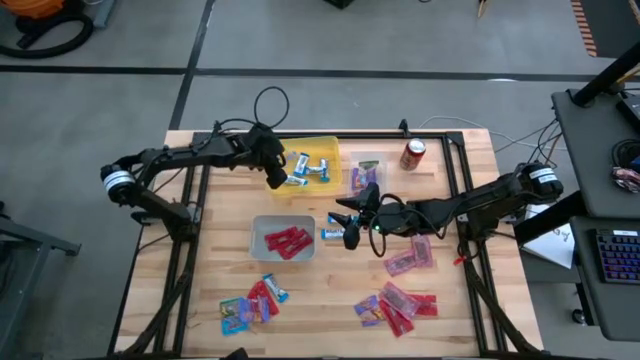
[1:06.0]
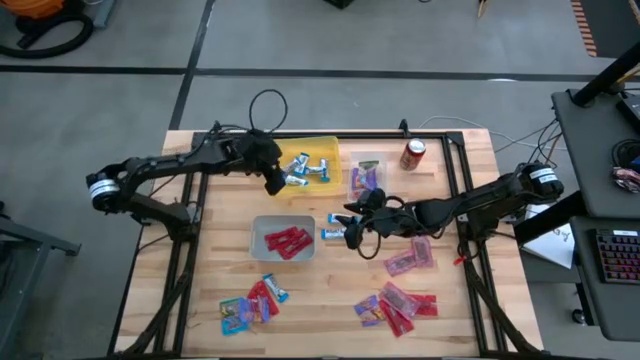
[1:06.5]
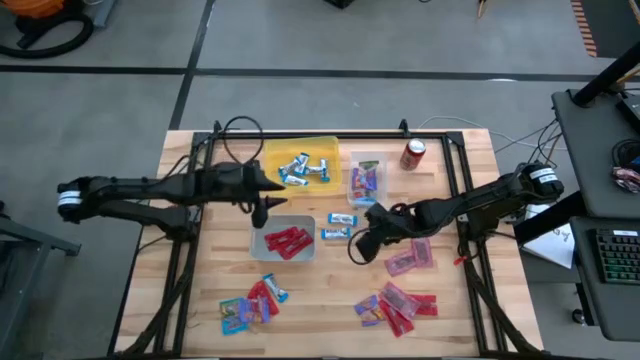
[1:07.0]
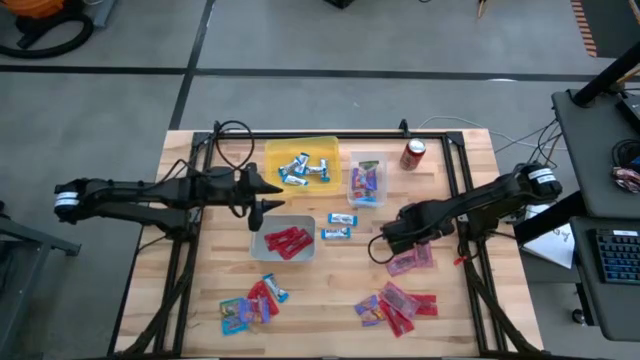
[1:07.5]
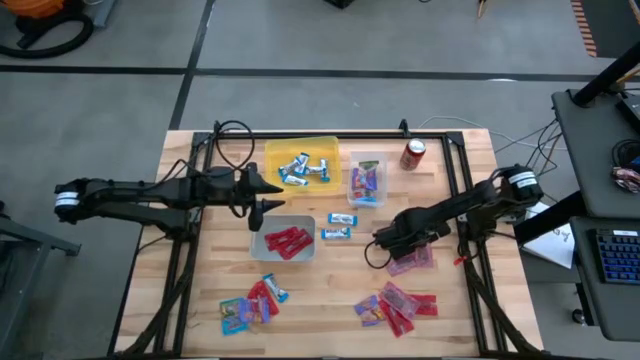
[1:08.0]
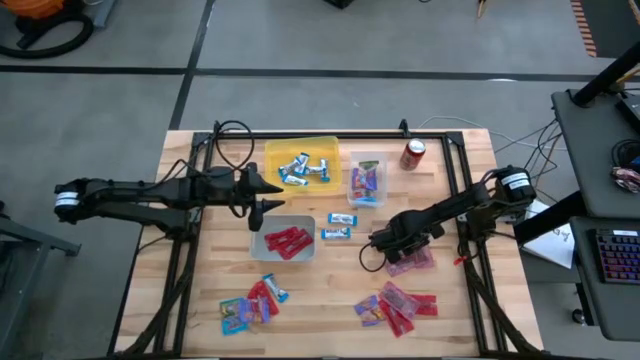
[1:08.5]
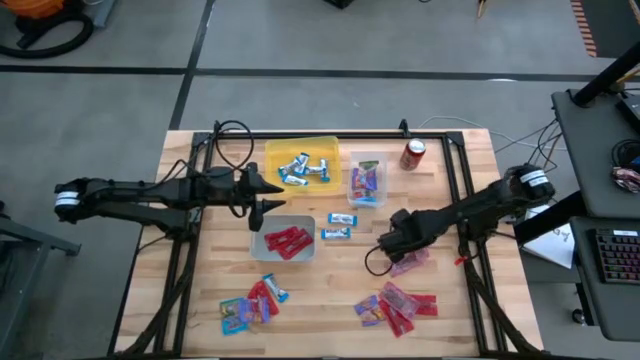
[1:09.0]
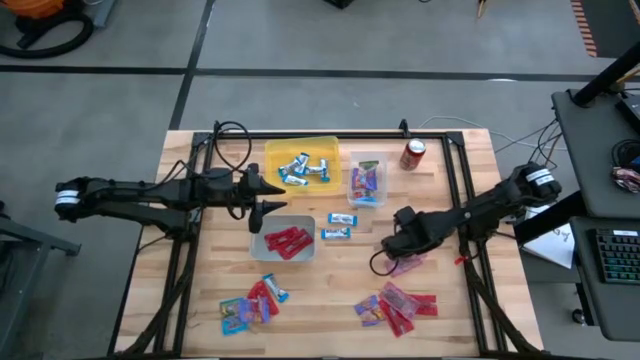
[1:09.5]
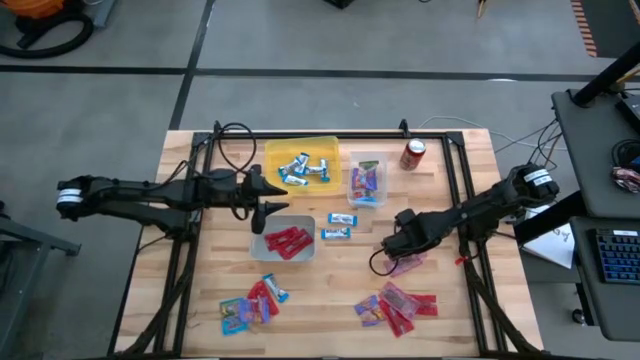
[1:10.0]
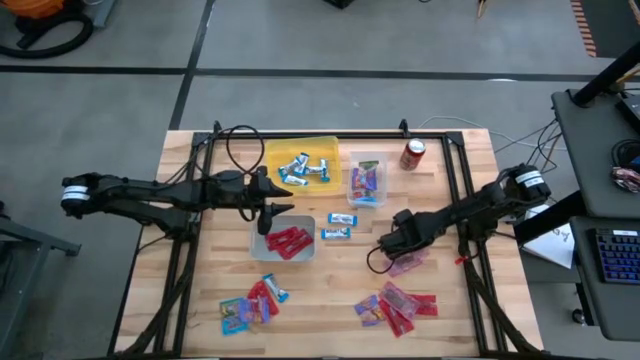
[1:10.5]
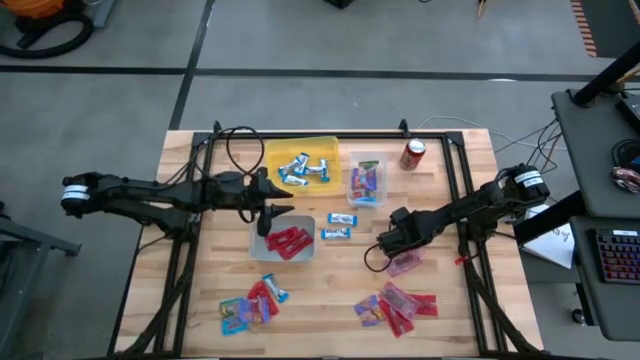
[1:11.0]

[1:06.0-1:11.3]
Task: Sort candy
Put the red candy into the gray bin

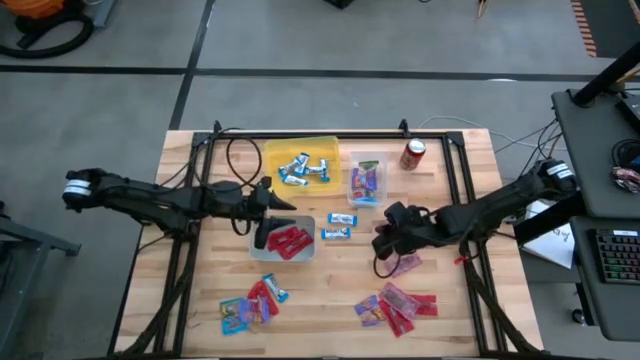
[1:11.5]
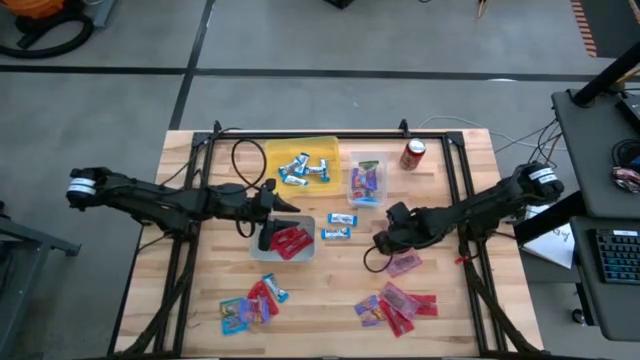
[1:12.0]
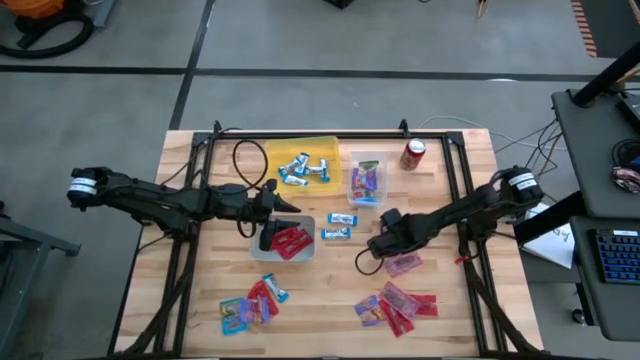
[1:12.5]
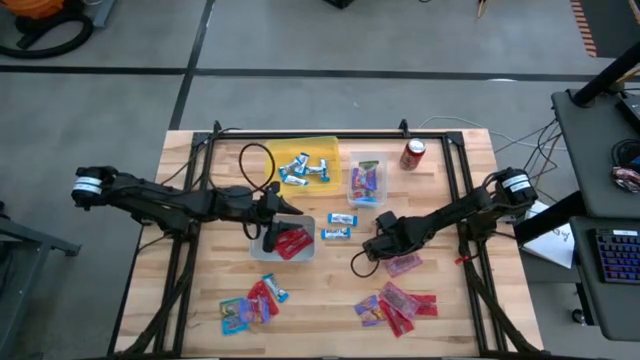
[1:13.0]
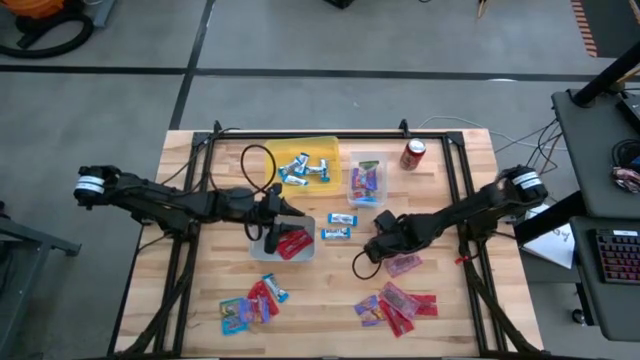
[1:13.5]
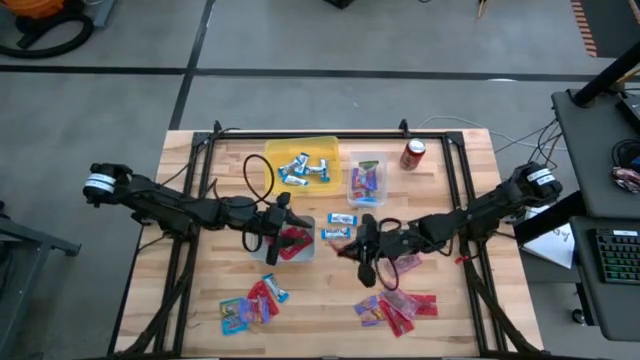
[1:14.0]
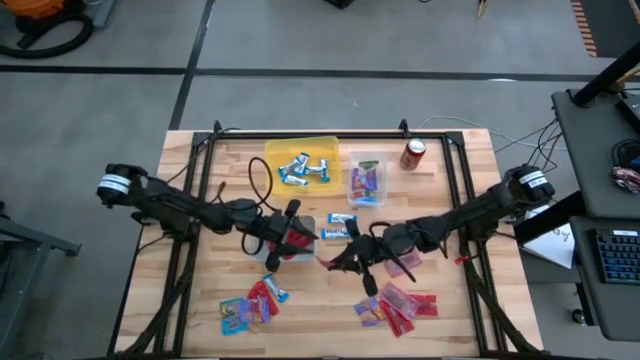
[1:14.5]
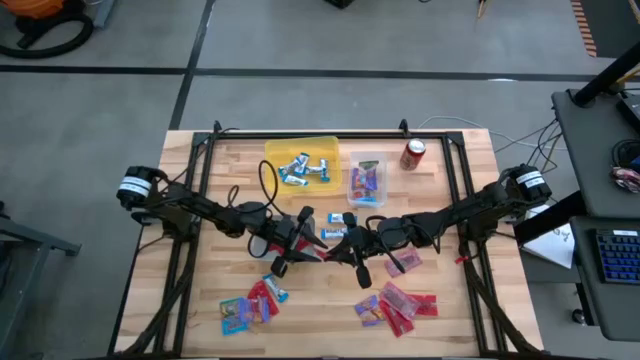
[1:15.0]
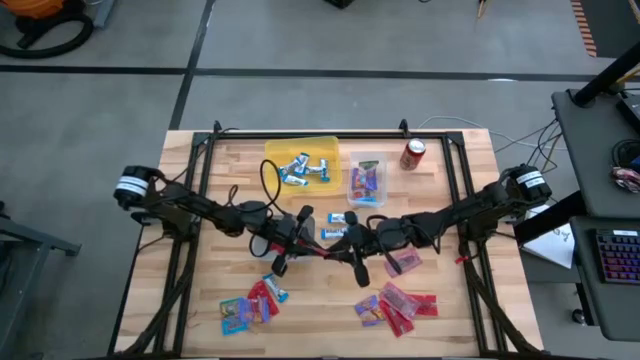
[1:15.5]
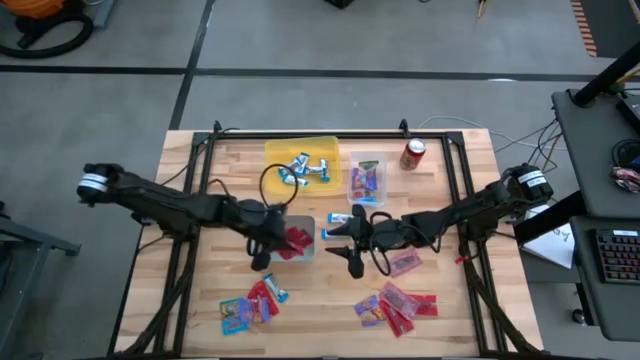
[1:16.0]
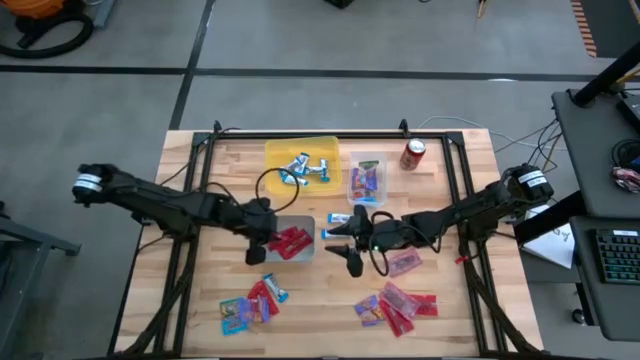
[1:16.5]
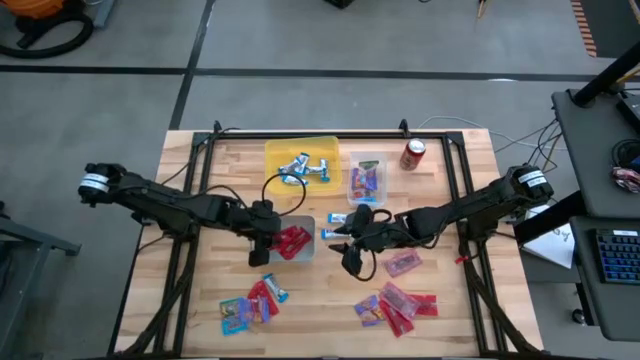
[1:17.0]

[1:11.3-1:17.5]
Put the red candy into the gray bin

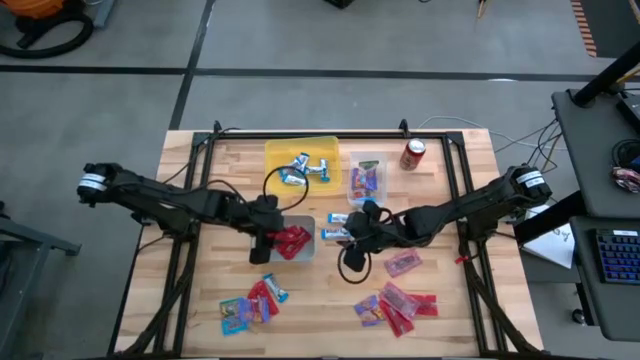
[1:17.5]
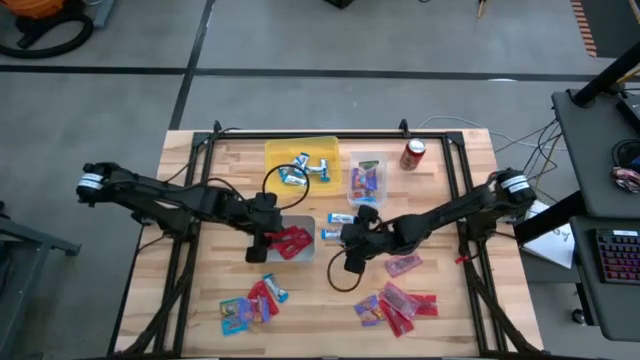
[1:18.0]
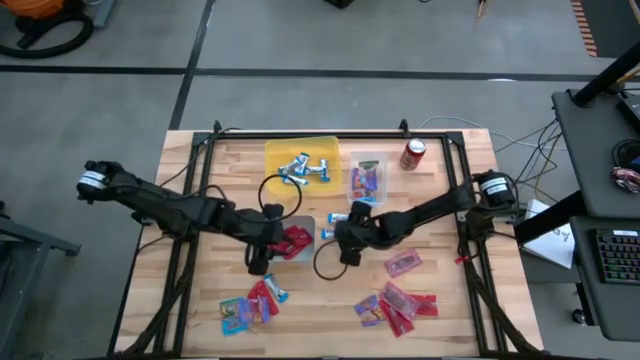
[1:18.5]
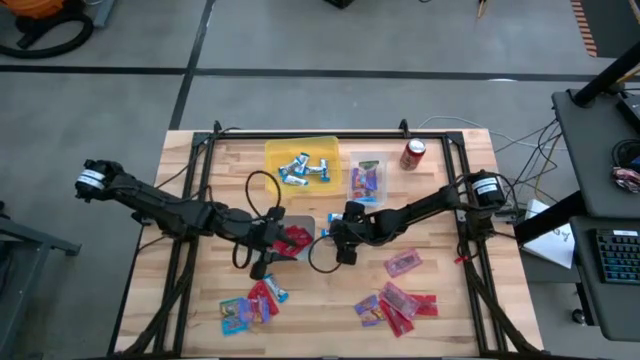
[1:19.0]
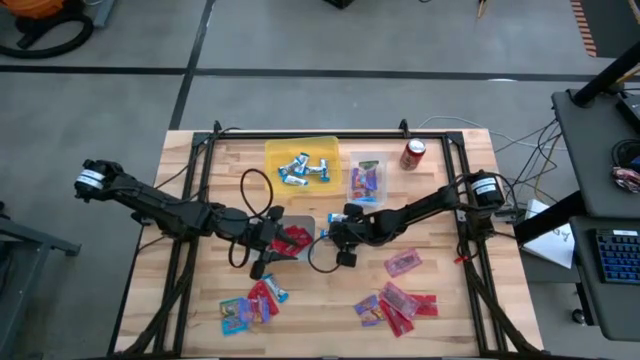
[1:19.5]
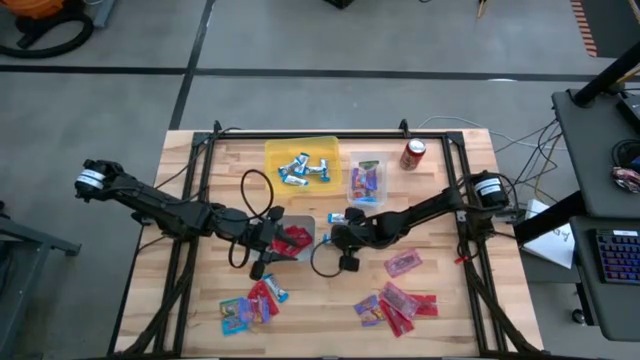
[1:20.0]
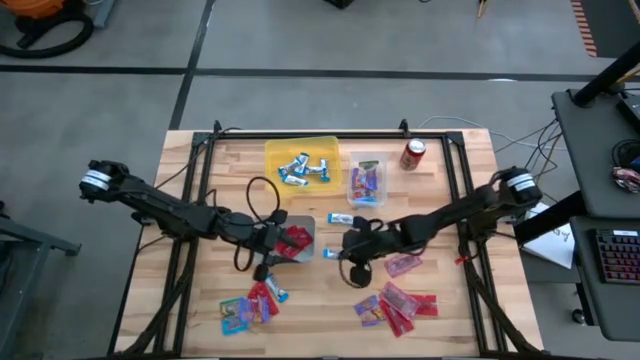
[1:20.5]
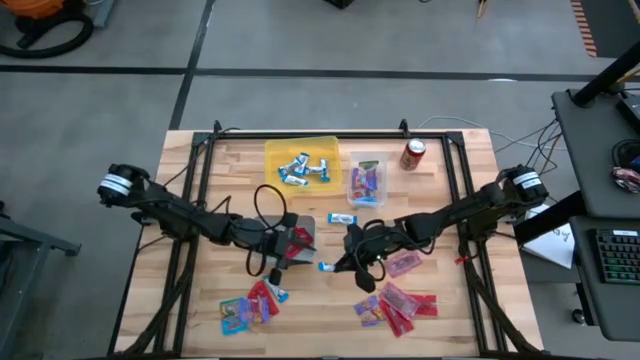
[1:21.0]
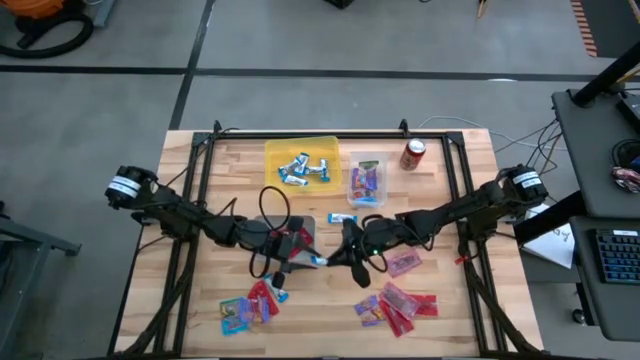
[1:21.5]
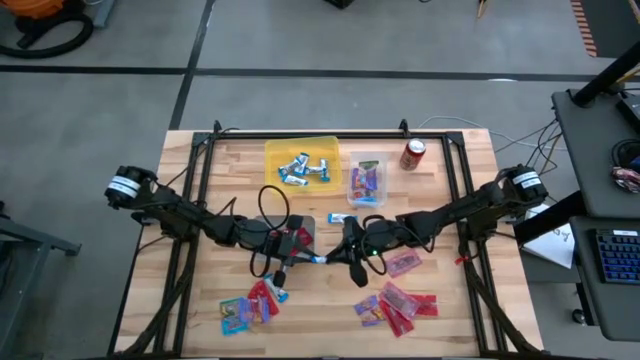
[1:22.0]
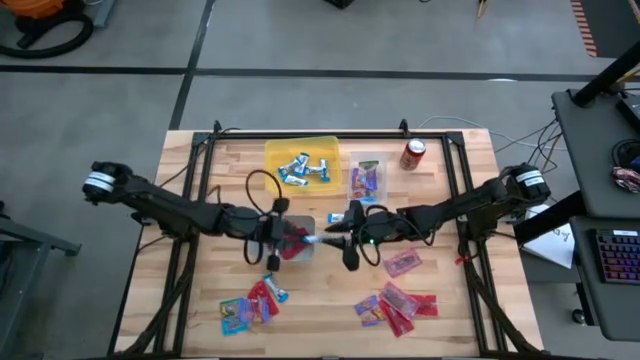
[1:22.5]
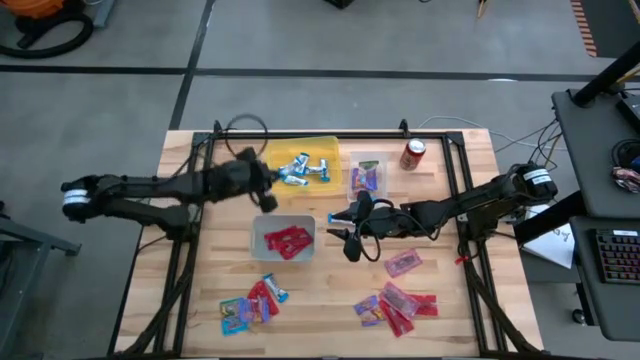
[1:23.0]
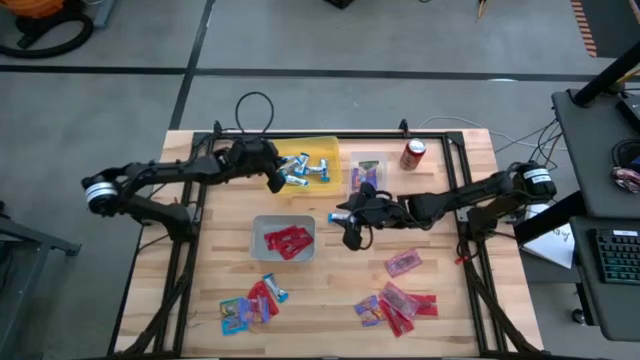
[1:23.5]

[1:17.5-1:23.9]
Put the white candy into the yellow bin

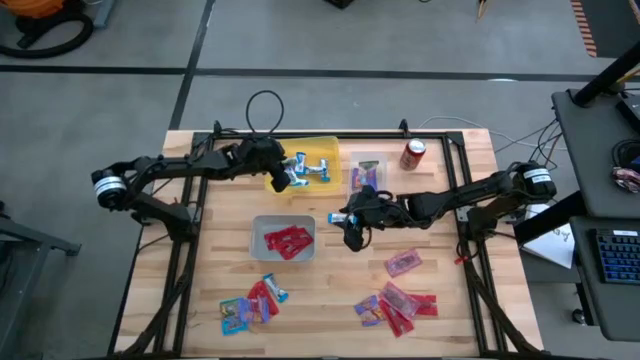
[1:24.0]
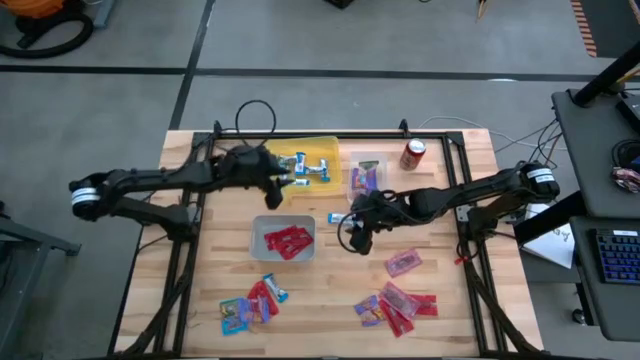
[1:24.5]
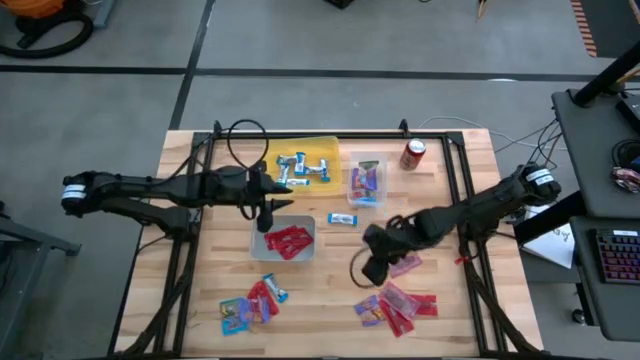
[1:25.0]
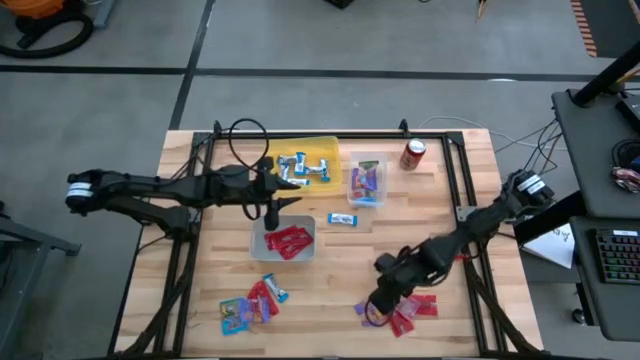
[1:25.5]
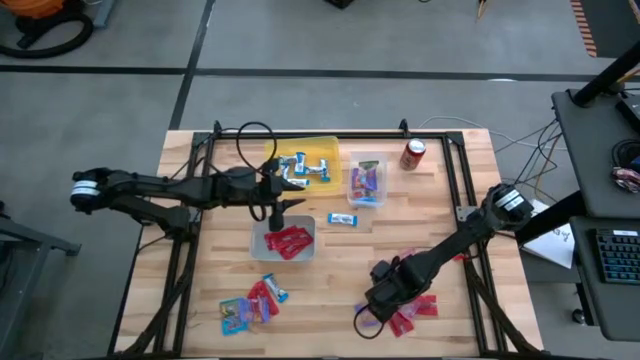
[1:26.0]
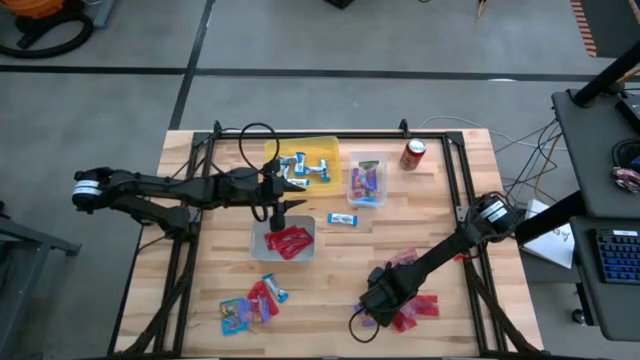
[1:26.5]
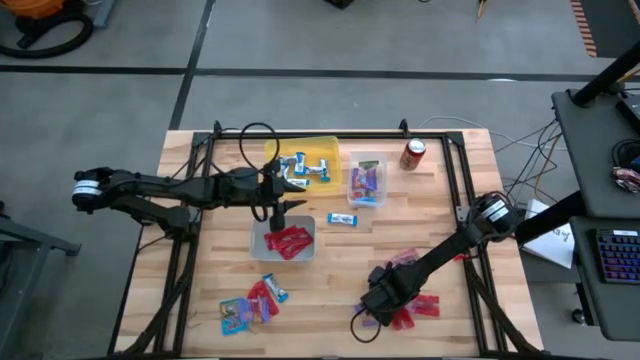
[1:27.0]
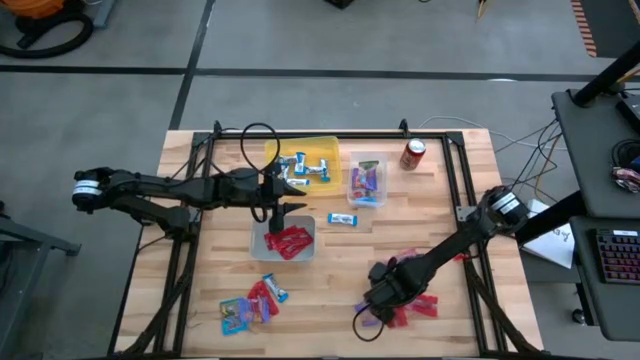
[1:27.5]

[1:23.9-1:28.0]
Put the red candy into the gray bin
